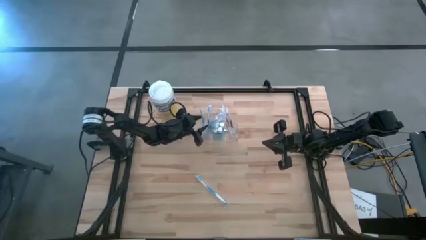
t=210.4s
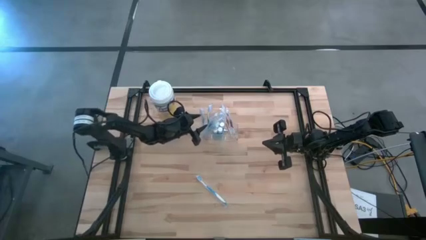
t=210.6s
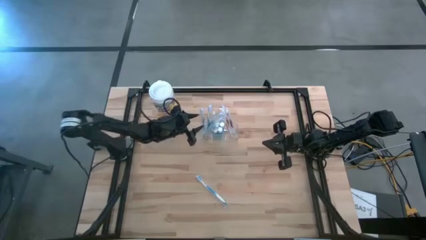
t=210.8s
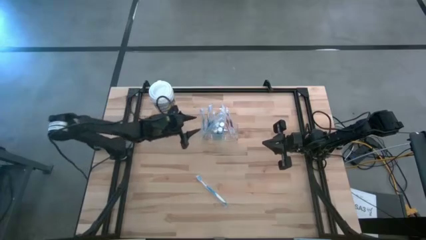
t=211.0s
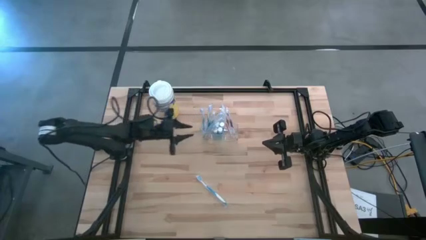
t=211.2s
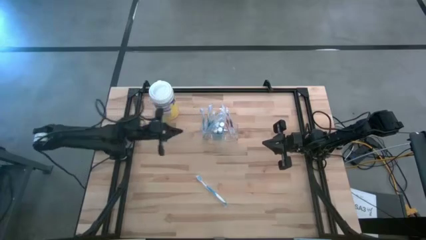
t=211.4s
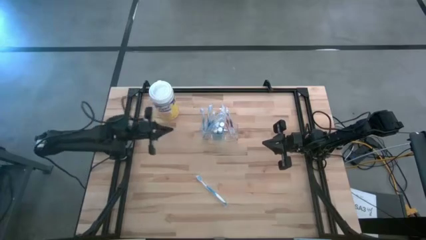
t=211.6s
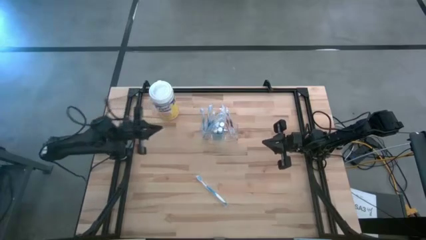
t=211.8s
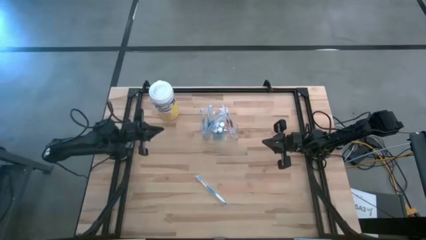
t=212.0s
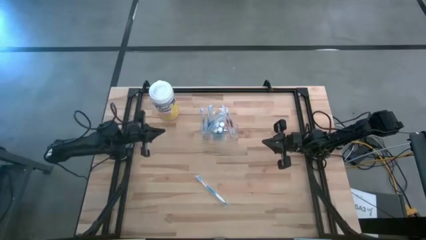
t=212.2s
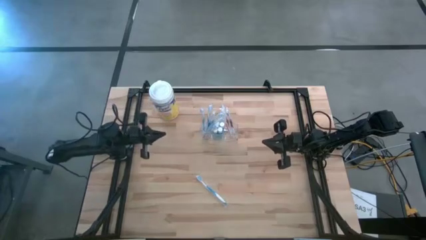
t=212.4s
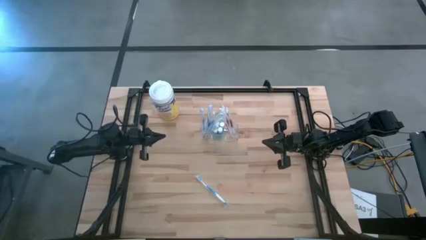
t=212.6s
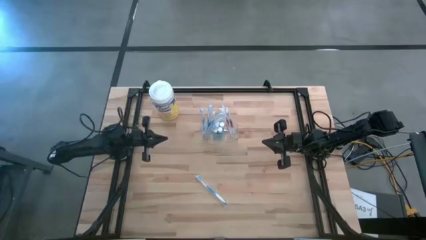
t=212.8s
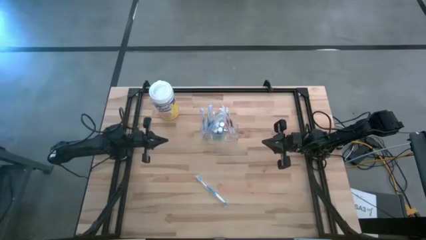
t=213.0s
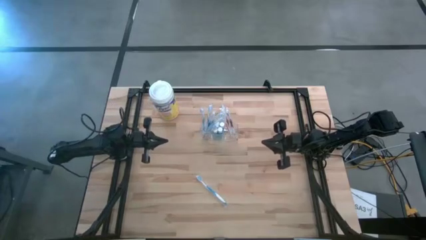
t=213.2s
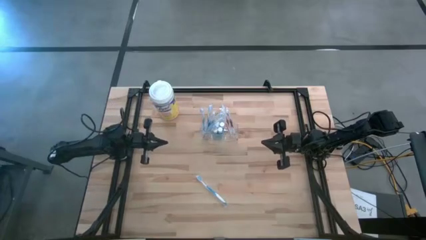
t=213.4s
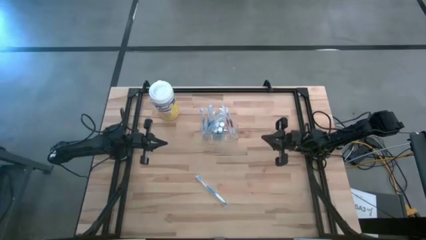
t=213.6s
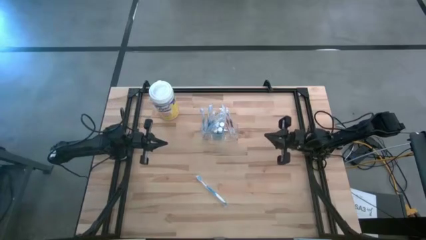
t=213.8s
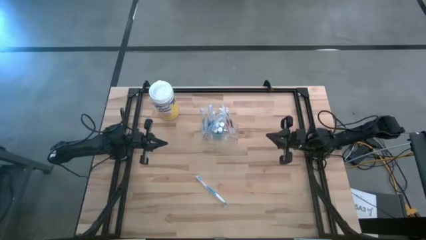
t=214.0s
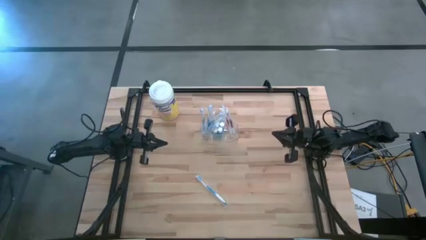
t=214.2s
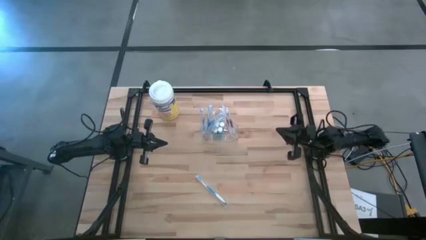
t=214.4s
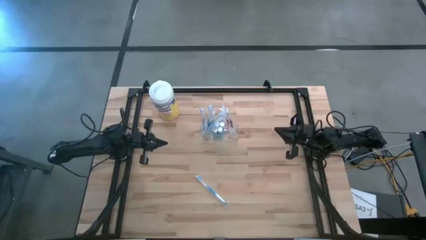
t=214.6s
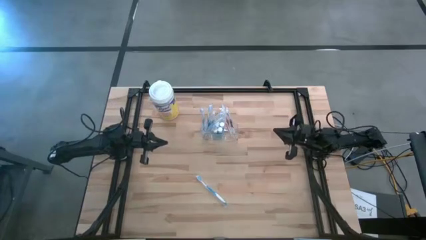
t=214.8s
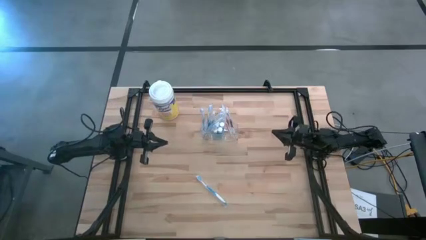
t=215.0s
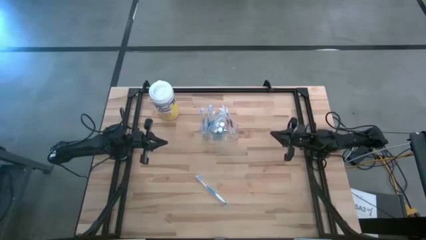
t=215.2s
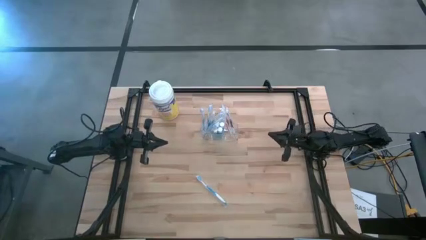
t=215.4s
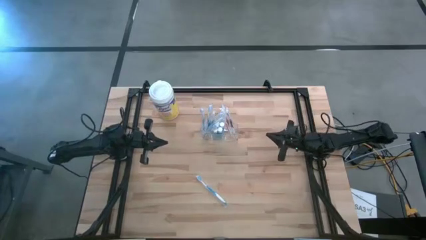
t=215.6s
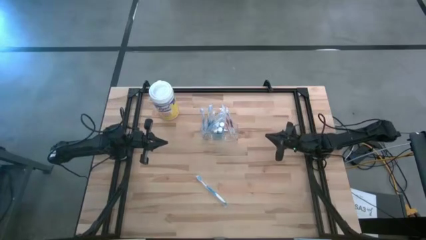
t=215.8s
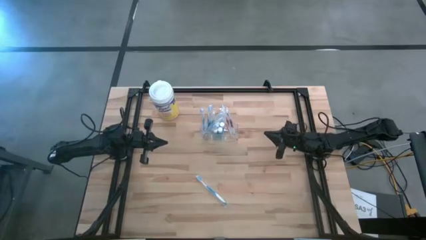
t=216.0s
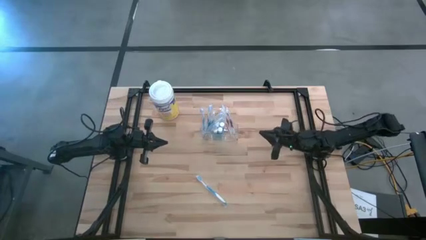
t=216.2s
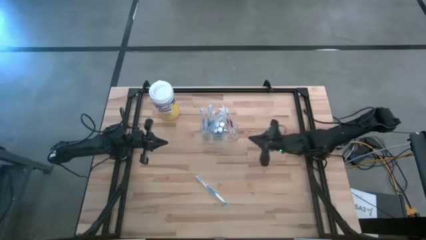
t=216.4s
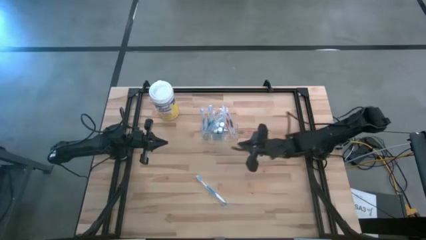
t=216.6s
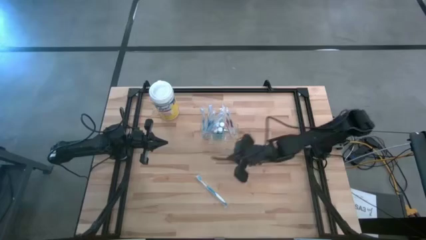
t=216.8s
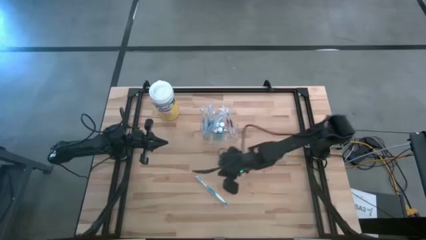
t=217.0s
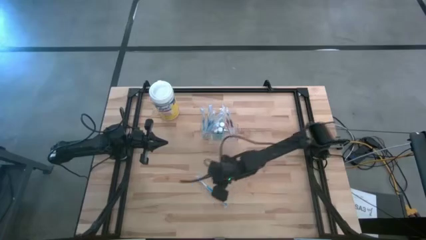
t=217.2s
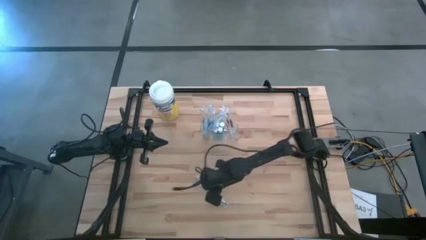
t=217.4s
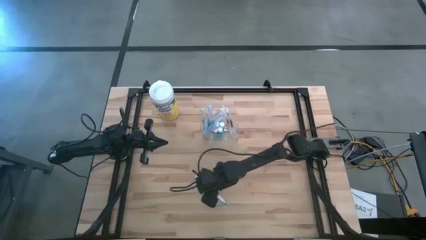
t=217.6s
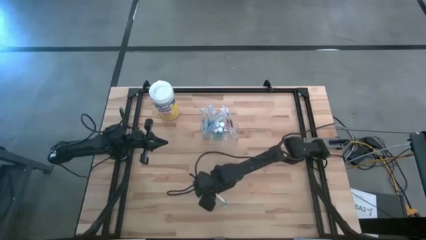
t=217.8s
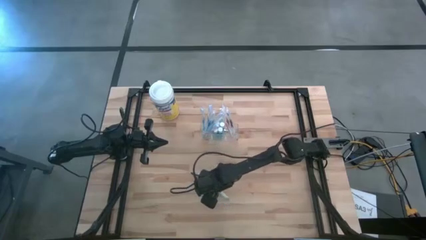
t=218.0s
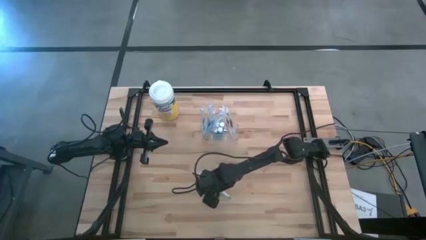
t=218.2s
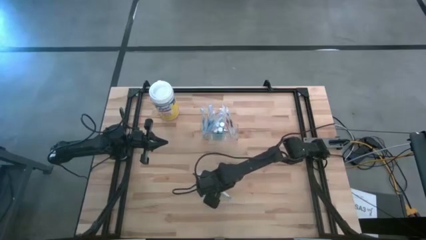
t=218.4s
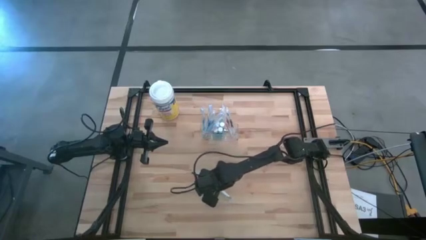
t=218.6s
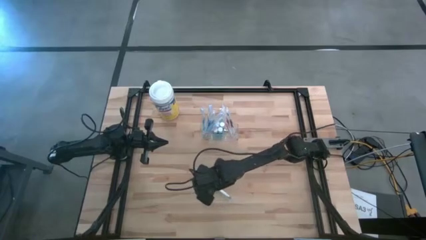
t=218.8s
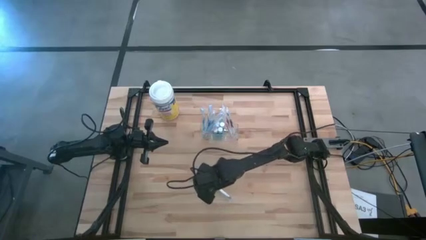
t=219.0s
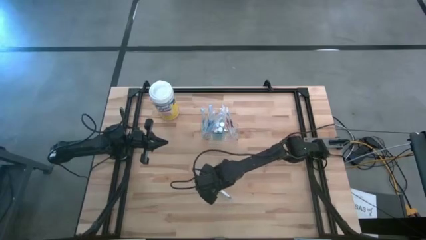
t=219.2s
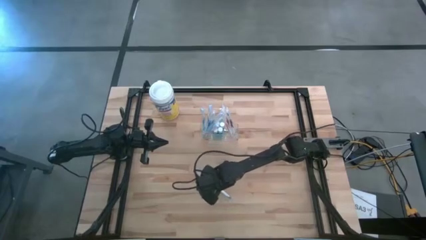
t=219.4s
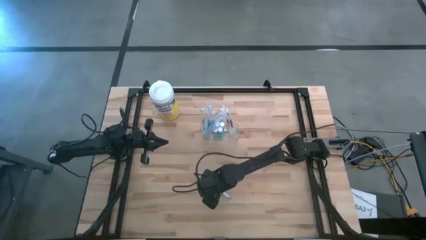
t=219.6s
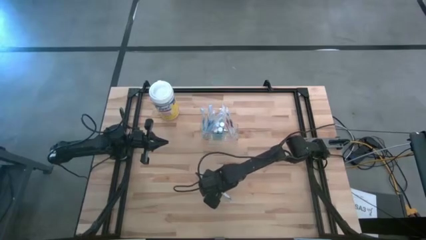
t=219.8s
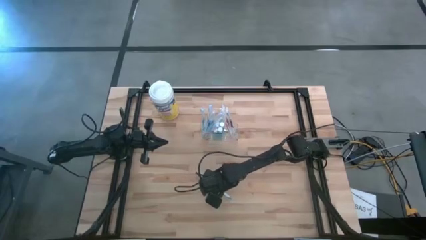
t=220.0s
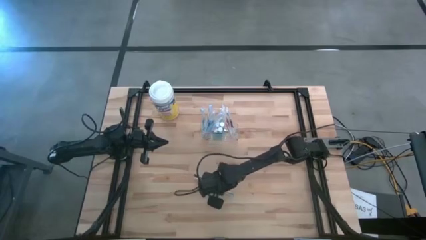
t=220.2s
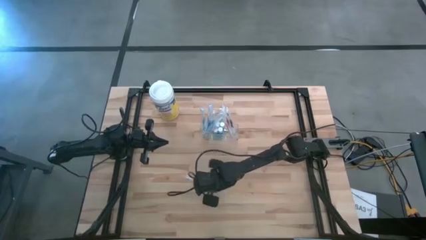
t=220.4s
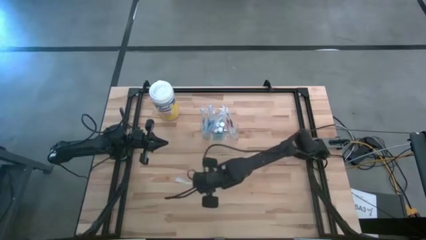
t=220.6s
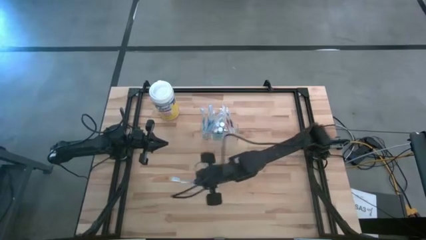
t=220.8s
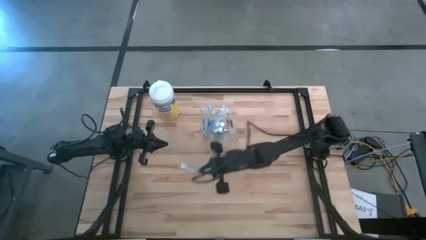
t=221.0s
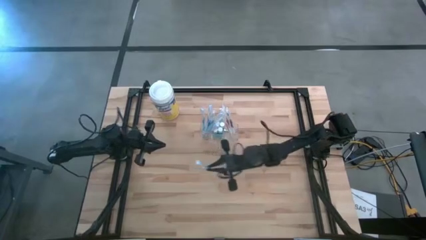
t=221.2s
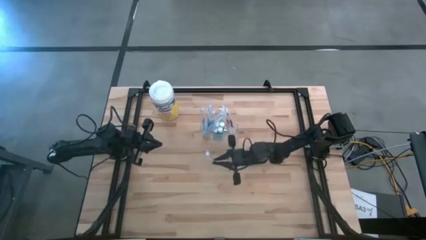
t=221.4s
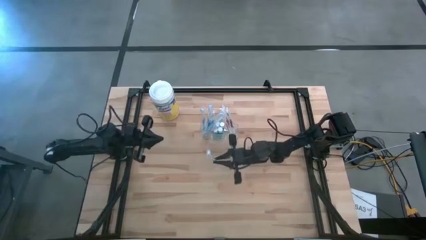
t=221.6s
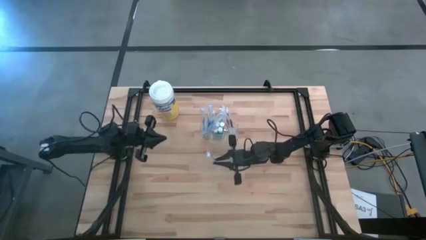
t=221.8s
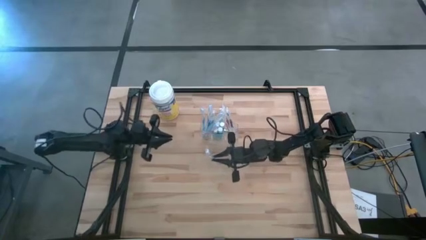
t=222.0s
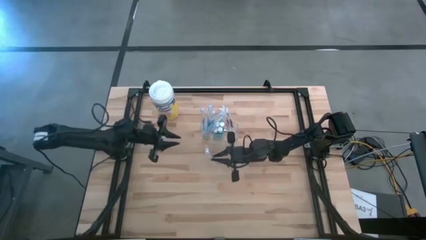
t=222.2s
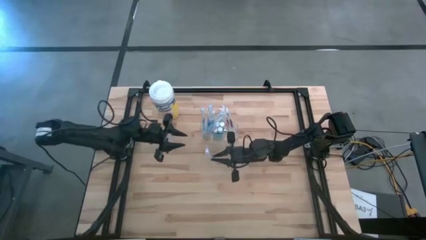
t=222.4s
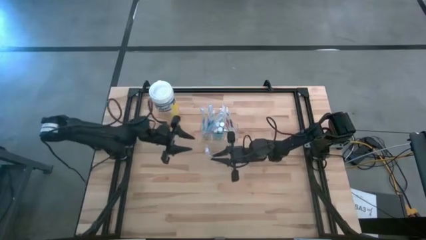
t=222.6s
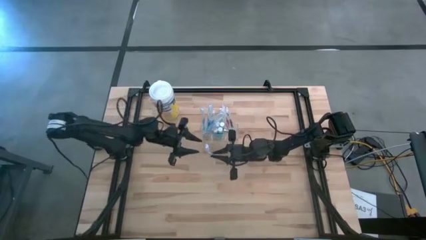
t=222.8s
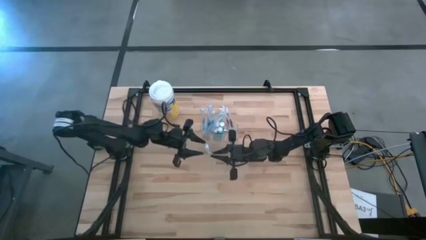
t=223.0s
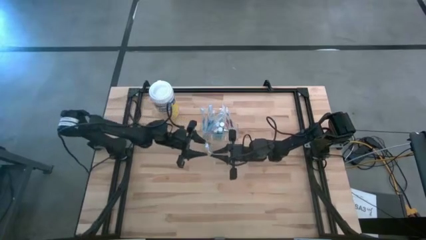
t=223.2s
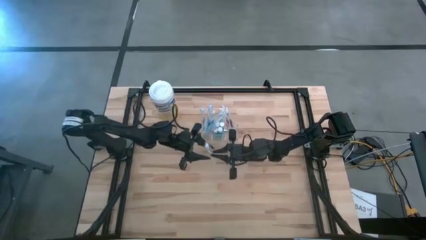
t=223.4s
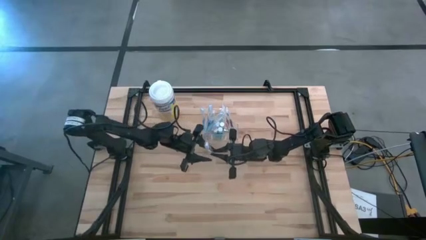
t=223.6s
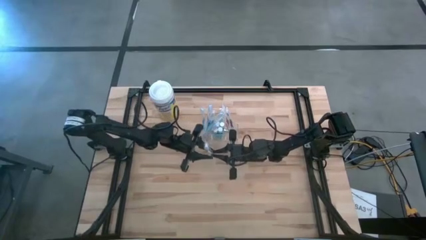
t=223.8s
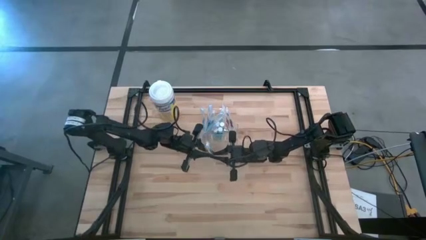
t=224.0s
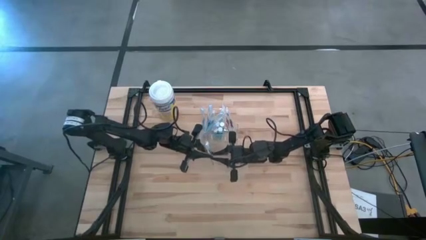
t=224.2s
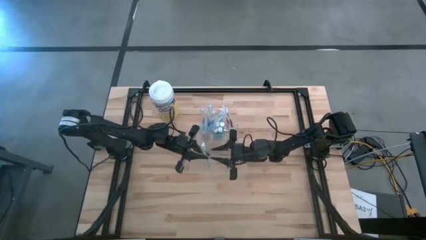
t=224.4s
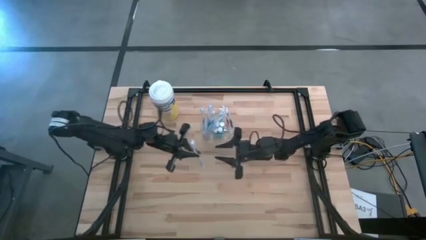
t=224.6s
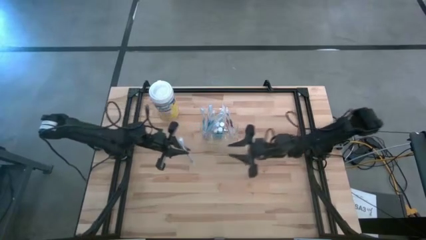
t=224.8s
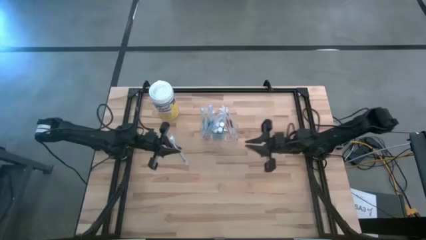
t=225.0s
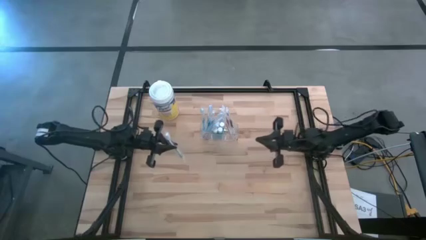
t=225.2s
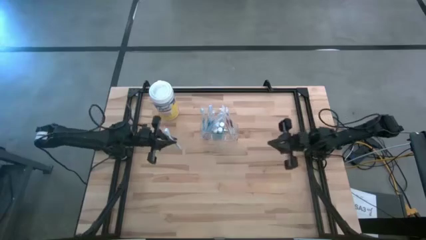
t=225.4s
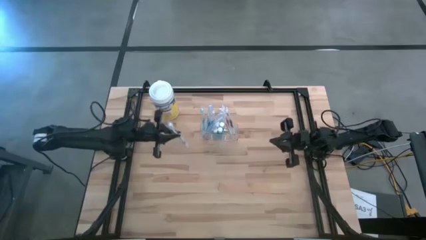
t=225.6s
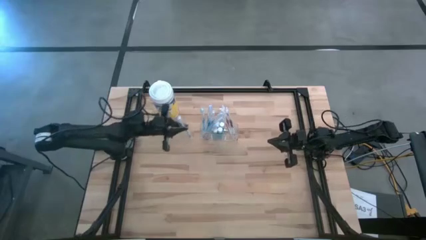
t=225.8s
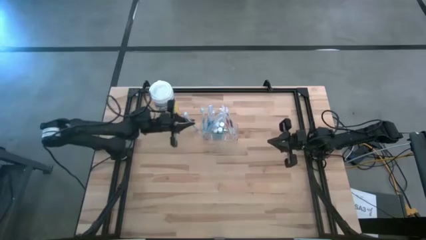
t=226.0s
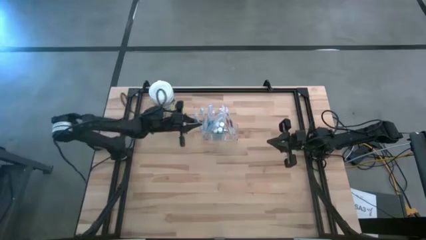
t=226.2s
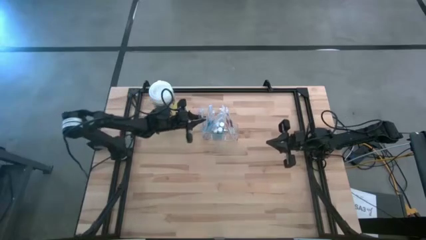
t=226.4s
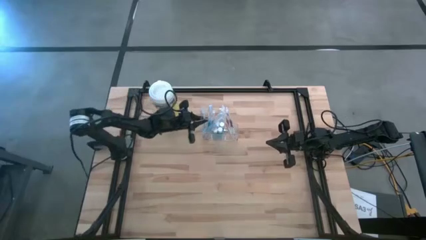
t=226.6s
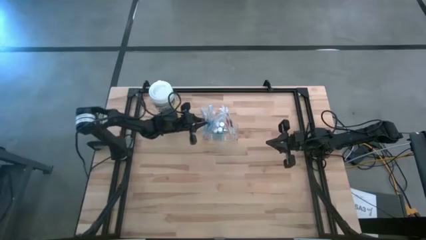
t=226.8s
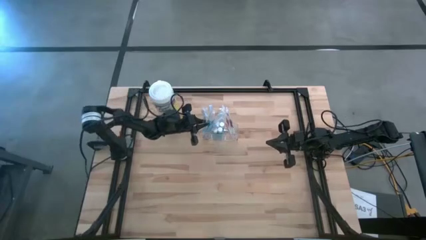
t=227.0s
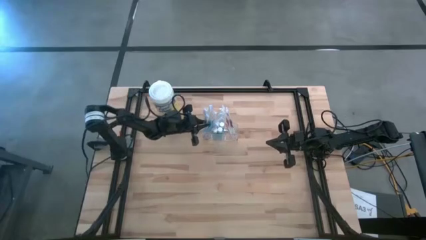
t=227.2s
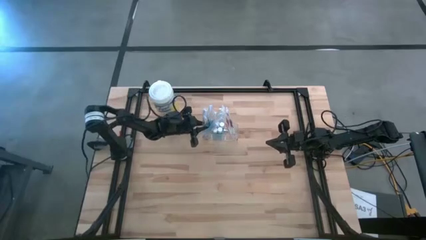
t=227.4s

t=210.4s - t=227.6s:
Task: Pick & Place toothbrushing station
Put the blue toothbrush into the left section of the transparent organizer
